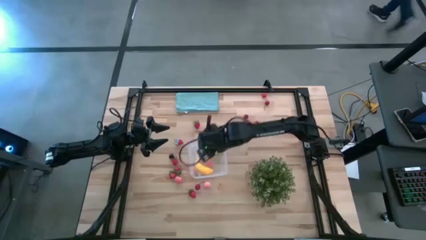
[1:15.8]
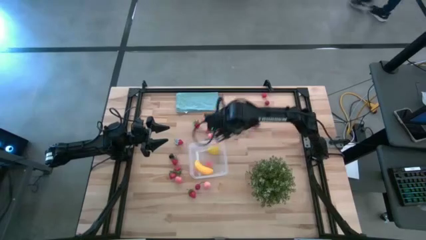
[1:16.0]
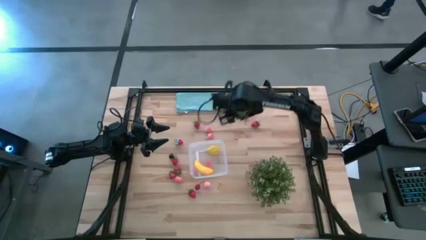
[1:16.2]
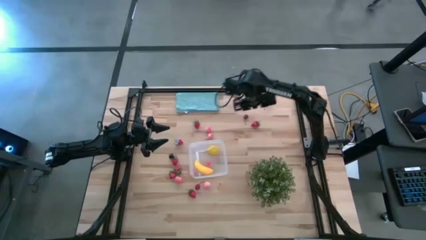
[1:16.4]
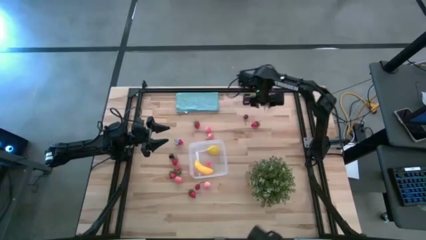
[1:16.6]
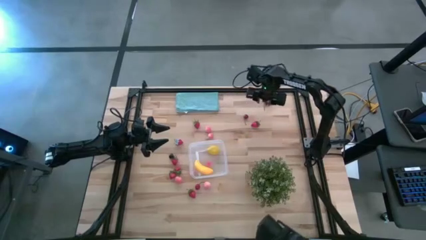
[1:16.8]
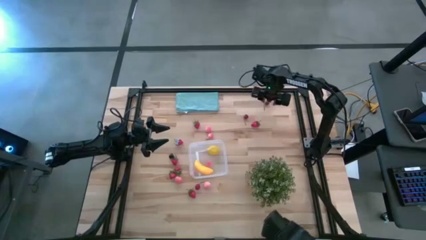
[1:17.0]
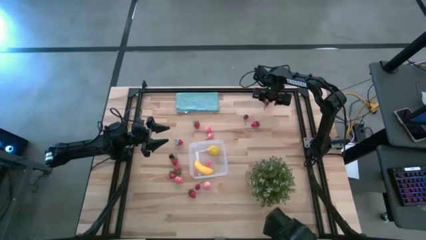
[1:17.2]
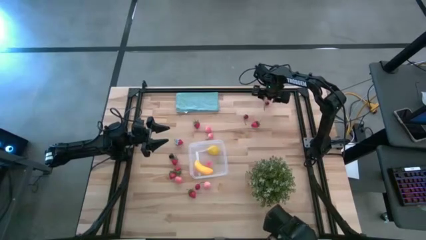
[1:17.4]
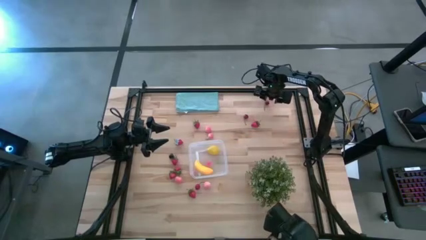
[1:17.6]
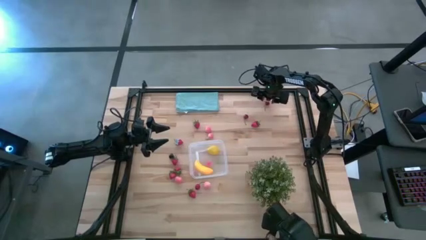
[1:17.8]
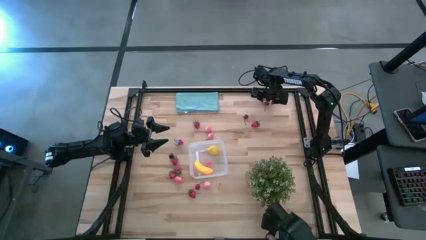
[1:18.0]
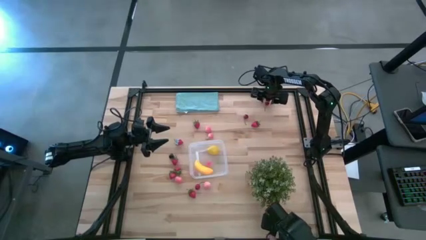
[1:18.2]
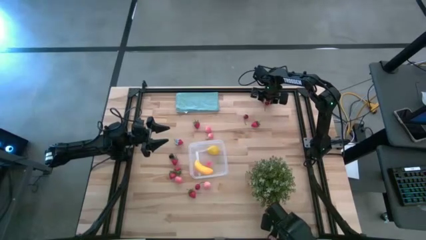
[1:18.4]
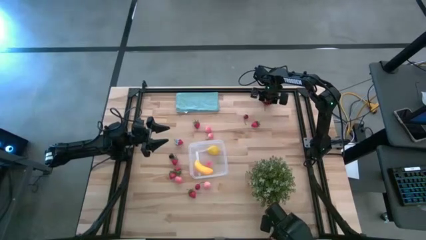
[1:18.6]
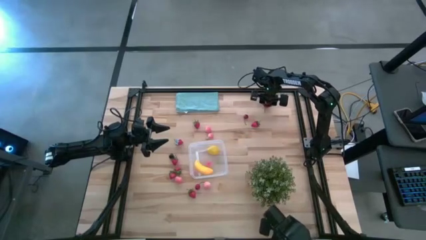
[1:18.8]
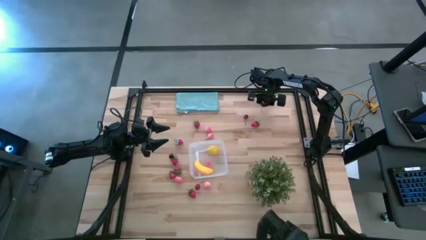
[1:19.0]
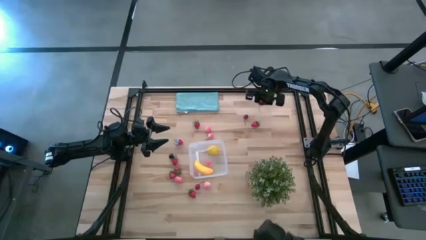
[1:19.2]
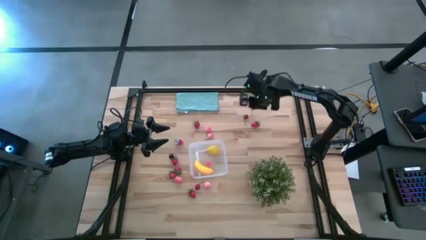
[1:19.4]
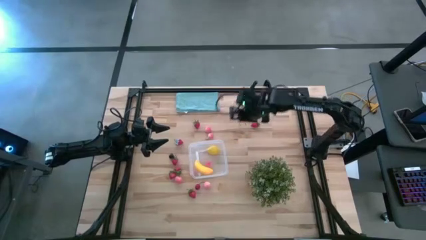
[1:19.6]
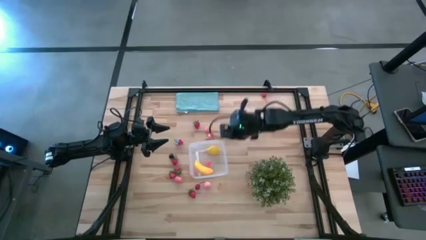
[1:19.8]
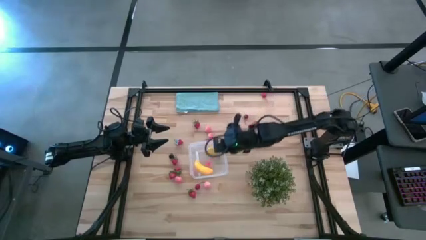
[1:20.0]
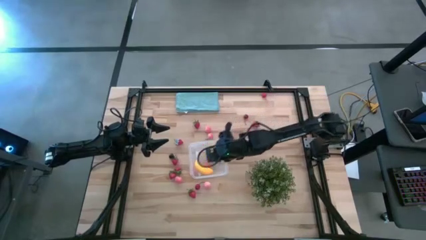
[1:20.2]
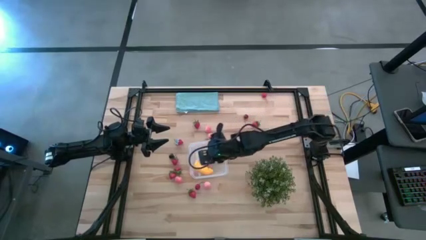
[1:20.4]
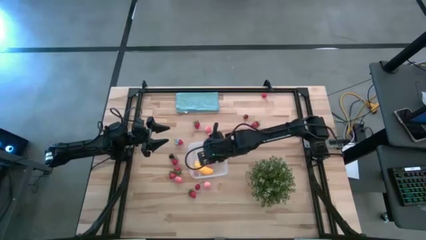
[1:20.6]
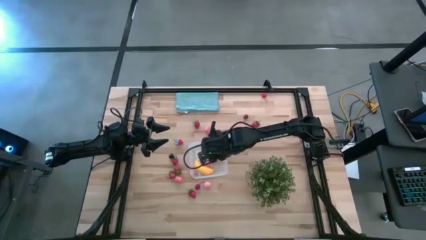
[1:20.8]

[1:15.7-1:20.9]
Task: Pick and placing Produce into tupperware
Put the red cherry into the transparent bin

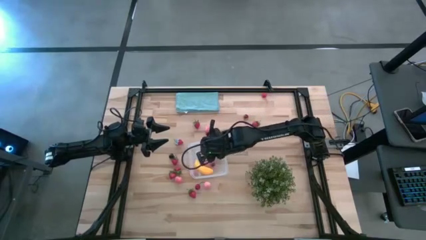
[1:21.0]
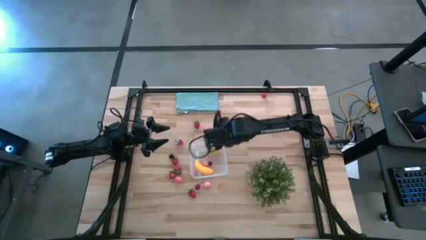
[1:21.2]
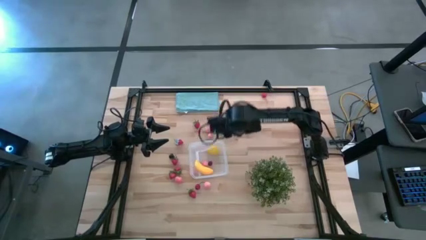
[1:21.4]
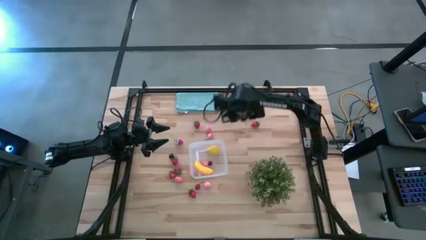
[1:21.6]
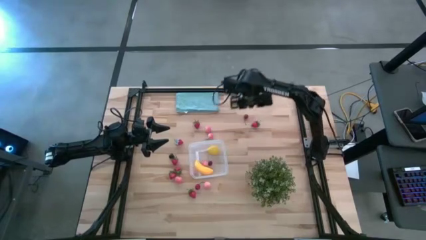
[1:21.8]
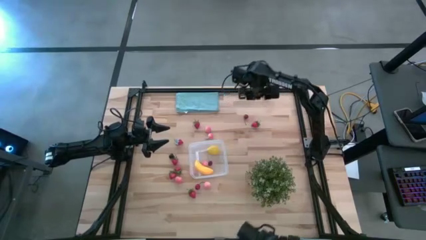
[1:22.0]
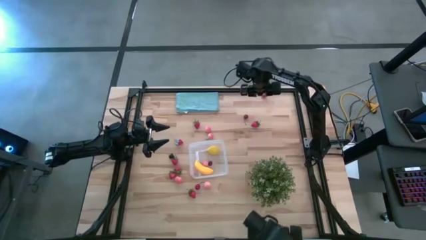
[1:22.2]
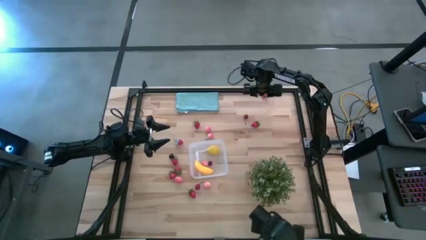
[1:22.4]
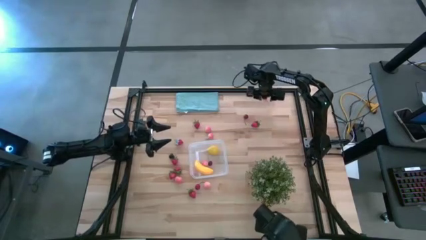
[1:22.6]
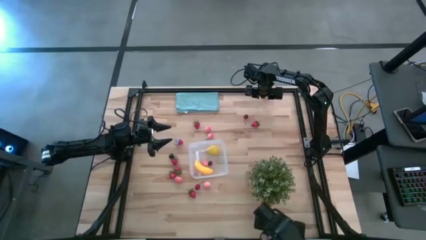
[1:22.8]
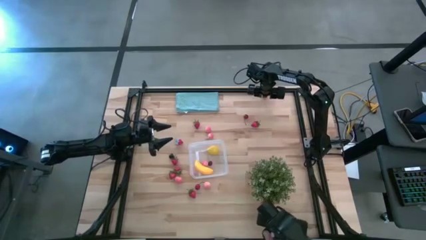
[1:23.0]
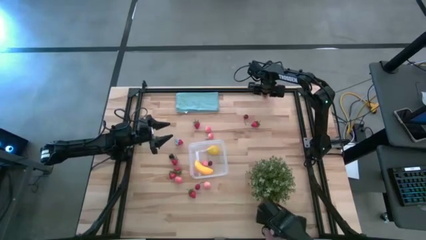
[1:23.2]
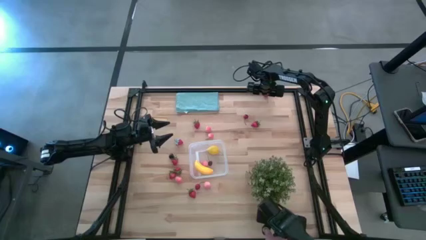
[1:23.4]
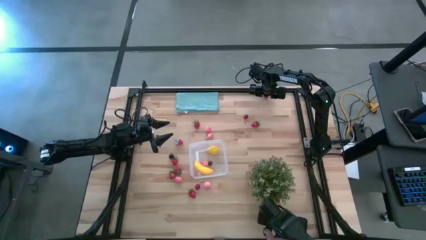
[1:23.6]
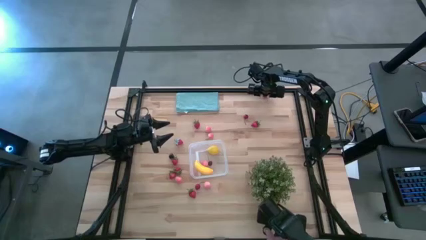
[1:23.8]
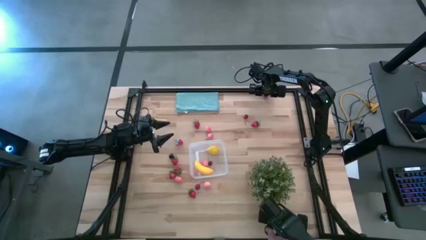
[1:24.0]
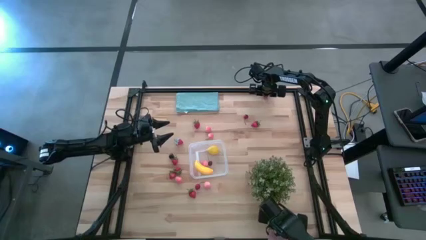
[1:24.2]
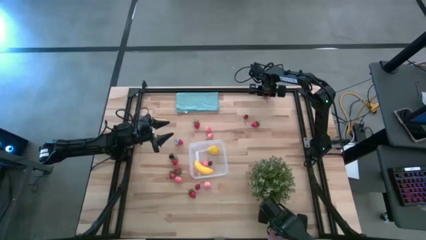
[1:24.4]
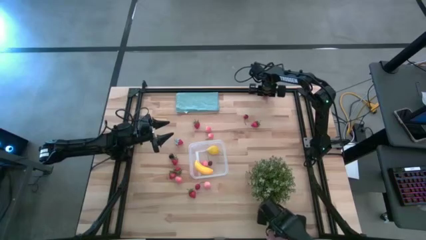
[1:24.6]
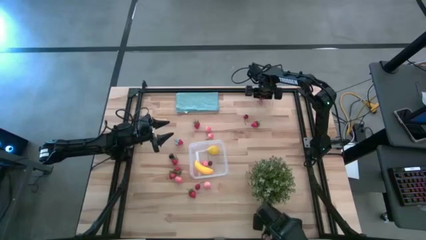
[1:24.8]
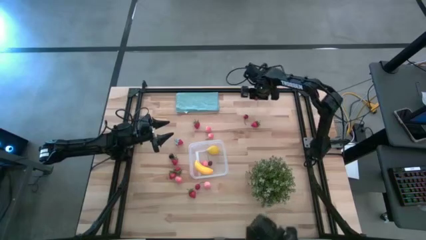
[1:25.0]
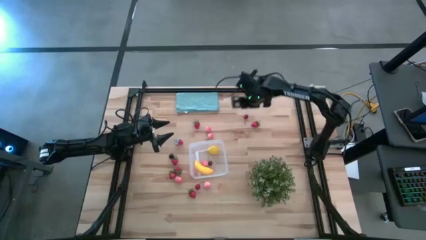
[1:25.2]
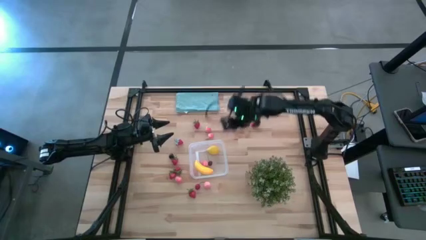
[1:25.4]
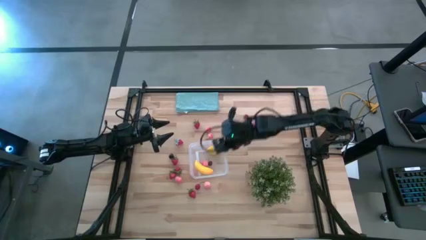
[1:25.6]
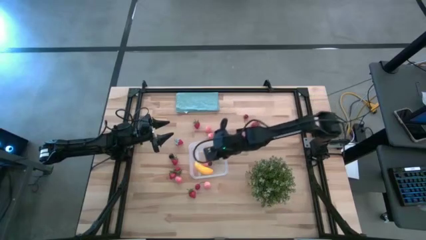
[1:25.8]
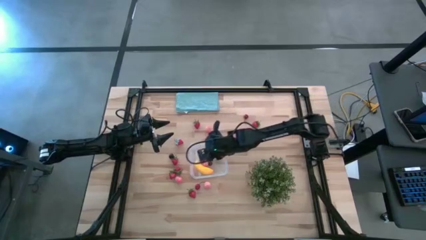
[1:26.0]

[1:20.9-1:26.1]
Put the red cherry into the transparent bin

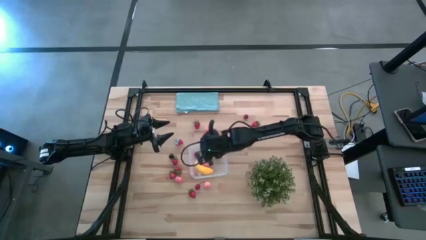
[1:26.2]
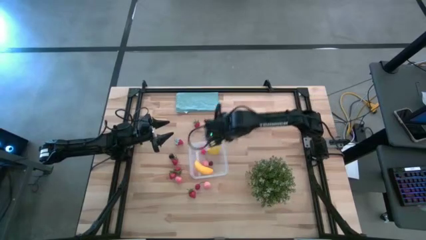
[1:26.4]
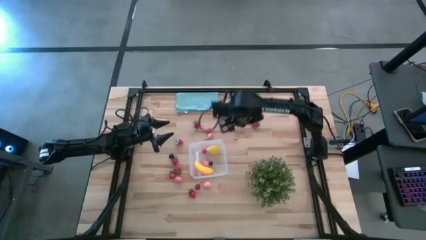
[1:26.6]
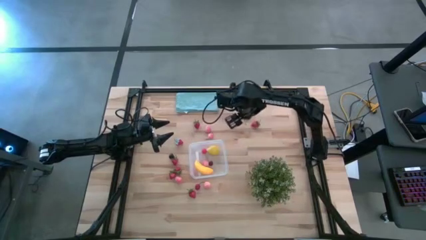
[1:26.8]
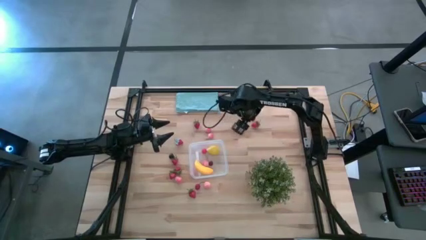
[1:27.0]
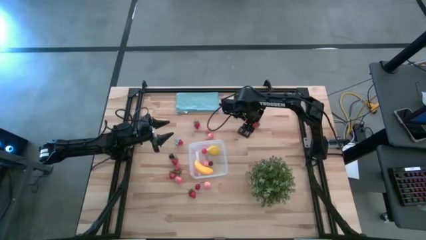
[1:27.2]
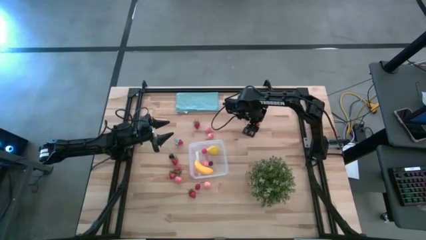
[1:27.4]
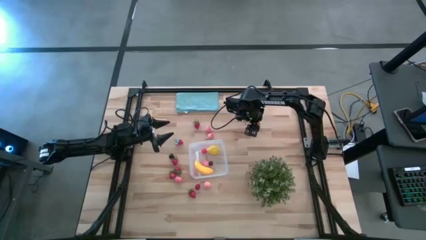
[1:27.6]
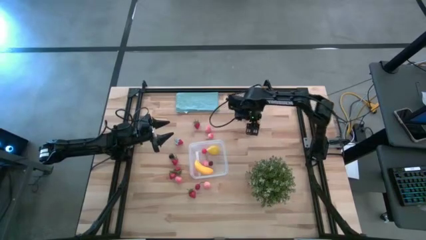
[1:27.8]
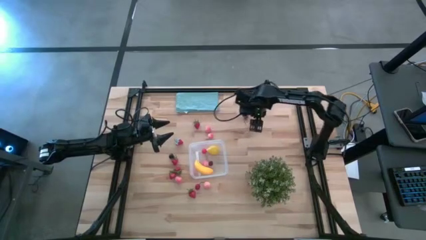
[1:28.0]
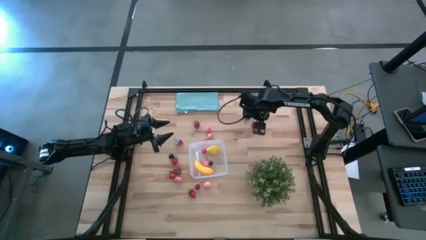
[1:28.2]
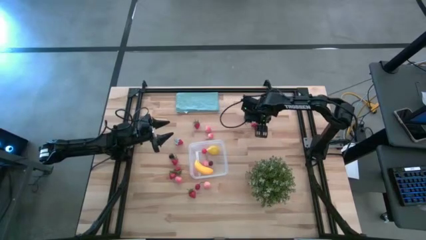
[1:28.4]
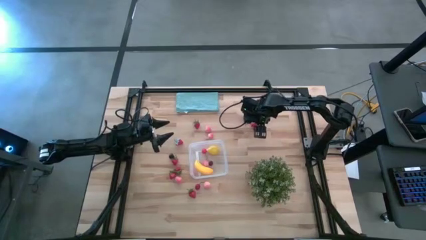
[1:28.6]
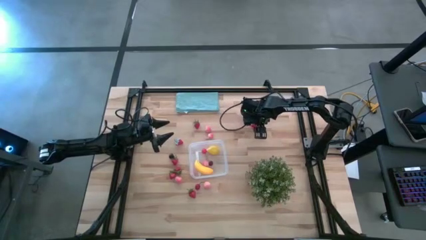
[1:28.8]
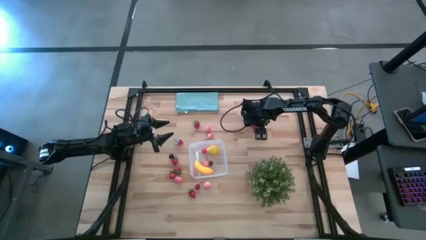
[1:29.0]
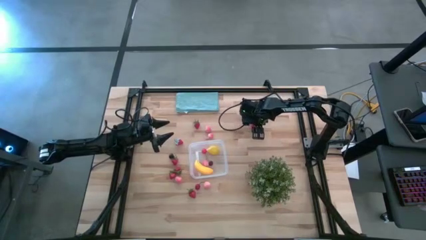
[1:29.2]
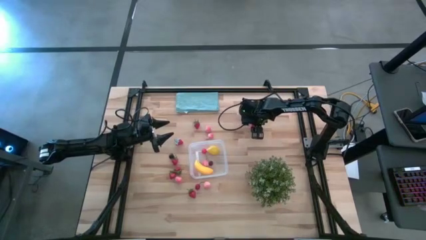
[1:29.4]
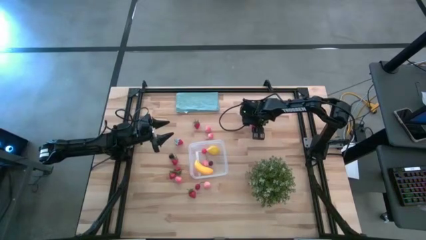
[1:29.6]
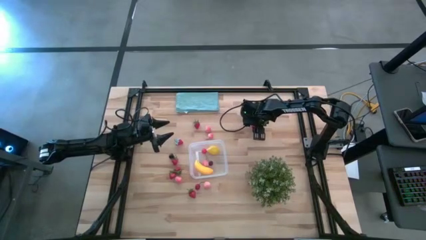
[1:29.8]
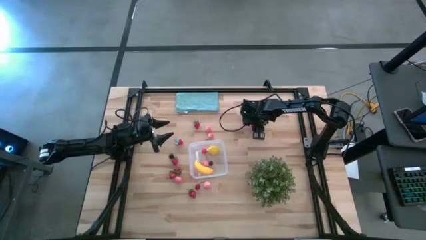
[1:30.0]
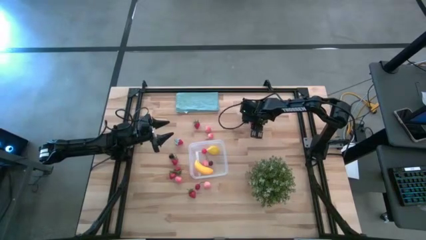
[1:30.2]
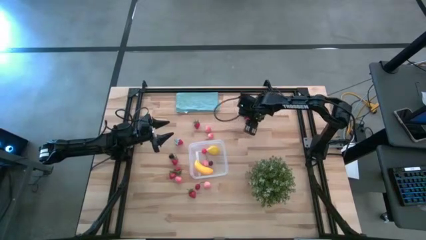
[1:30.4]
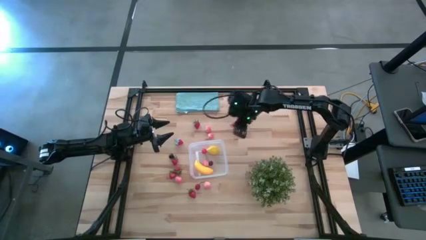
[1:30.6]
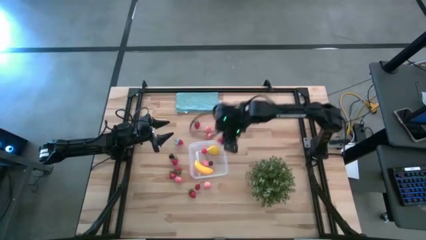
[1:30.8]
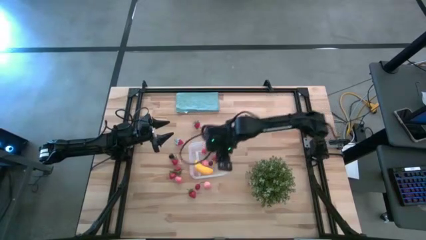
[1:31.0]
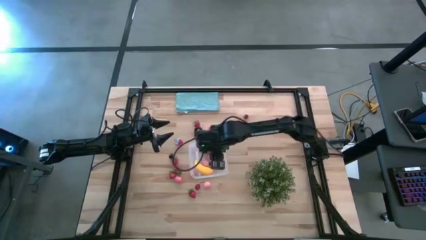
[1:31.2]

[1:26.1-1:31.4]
Put the red strawberry into the transparent bin

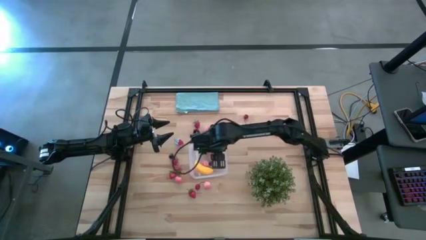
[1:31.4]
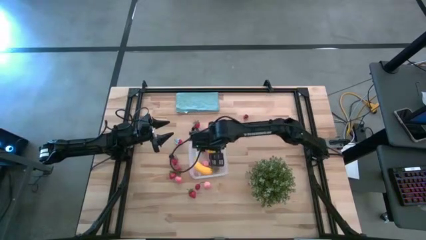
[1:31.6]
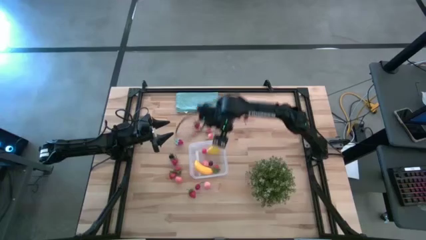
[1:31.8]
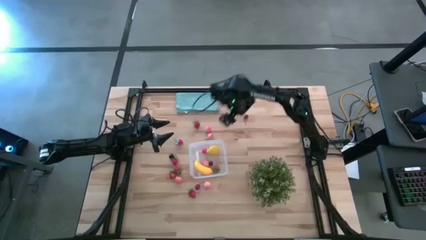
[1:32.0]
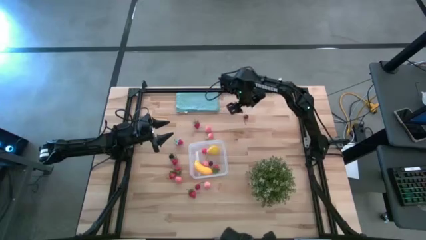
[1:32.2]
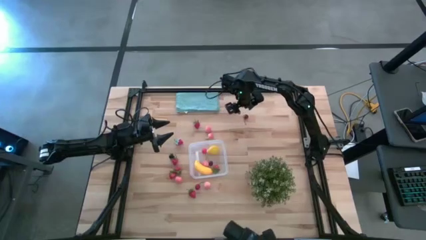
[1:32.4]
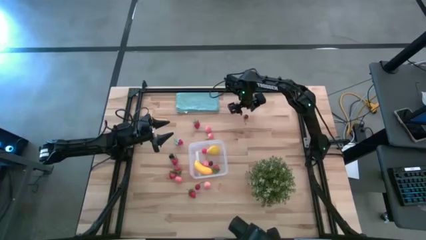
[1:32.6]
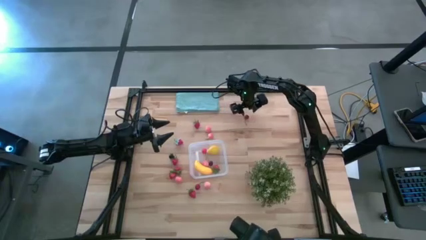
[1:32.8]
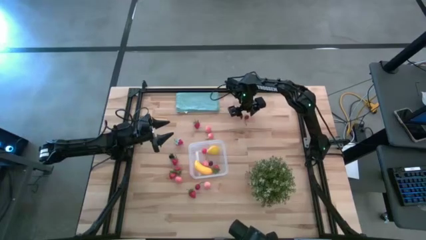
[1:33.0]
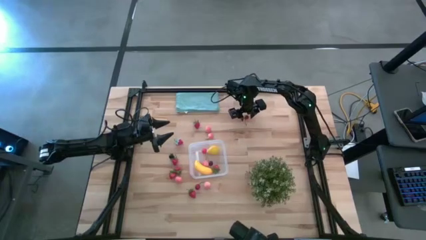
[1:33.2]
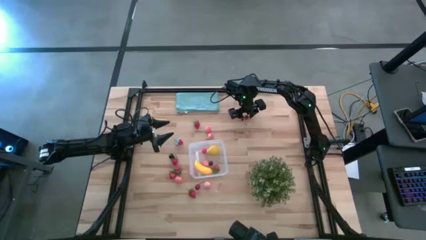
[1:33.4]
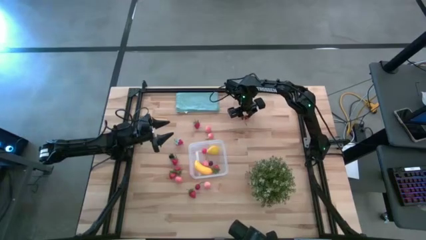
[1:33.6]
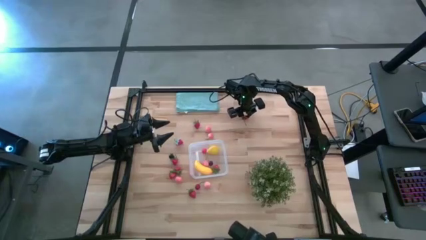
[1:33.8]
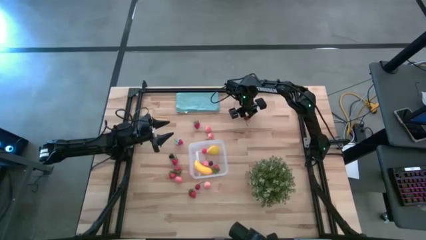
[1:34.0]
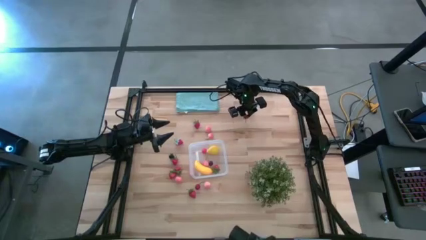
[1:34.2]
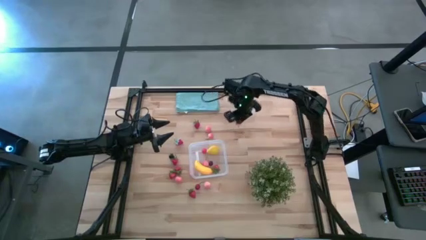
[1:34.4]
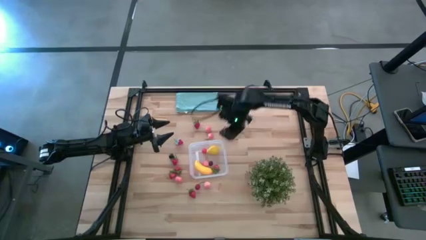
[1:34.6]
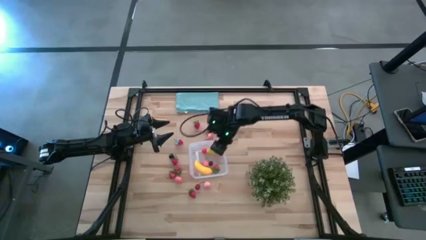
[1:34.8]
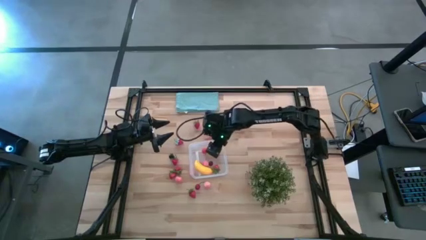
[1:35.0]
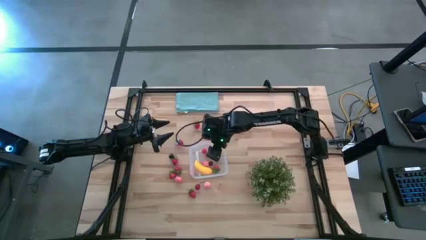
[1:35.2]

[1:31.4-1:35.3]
Put the red cherry into the transparent bin
